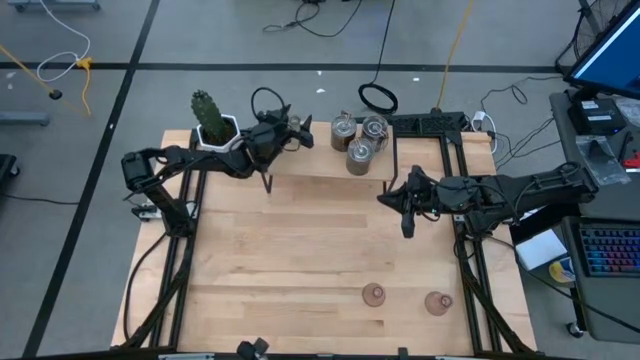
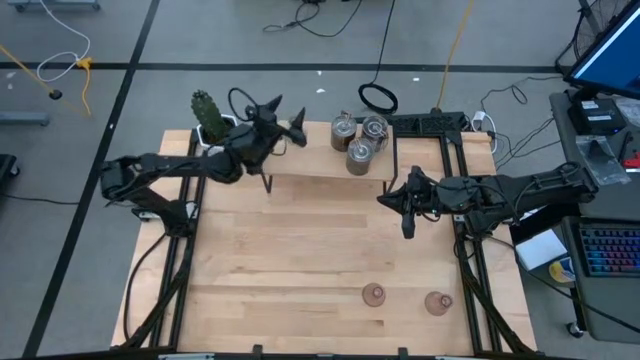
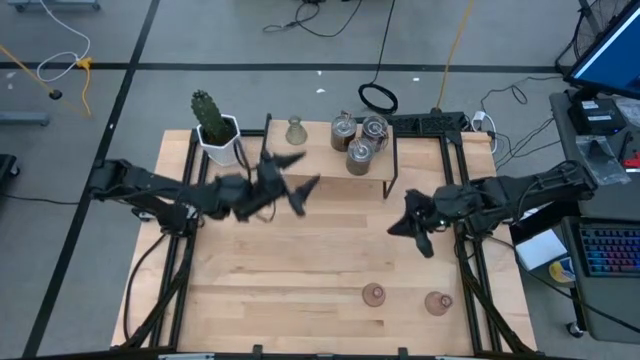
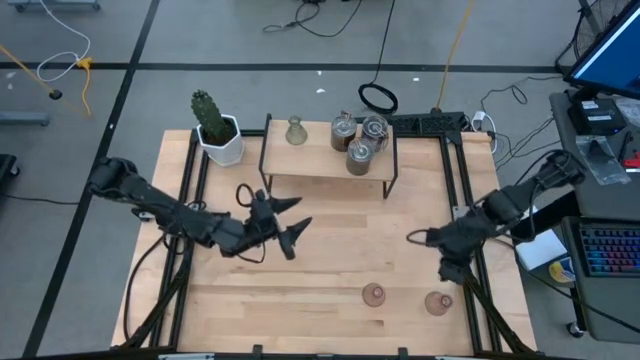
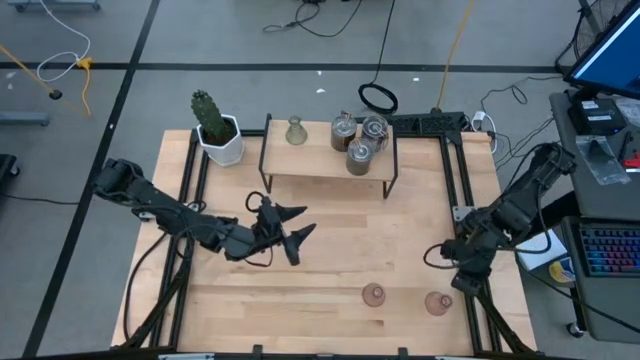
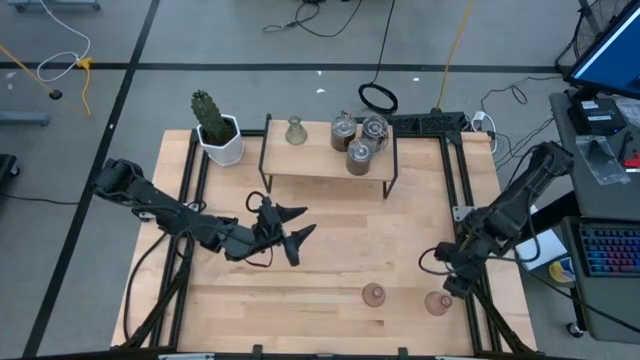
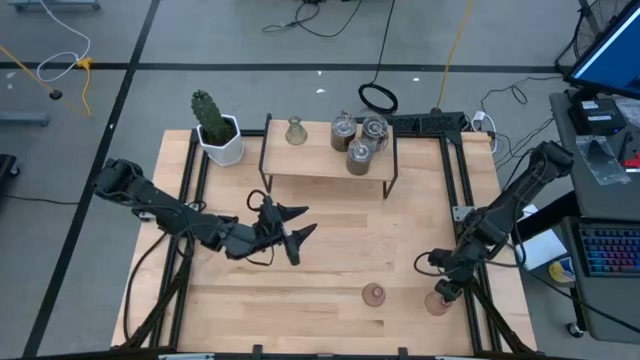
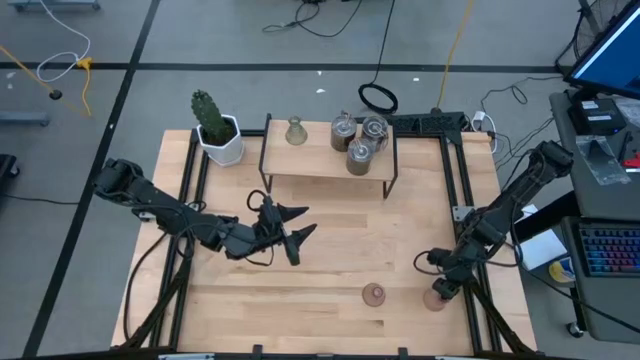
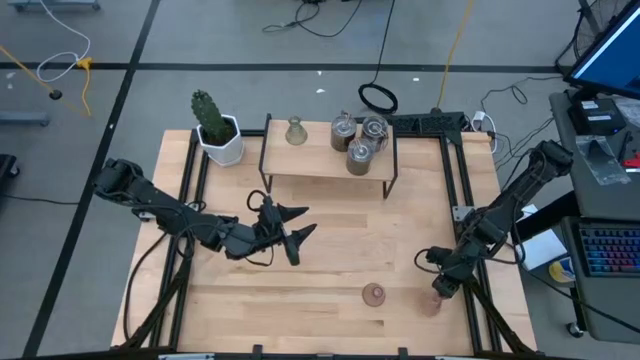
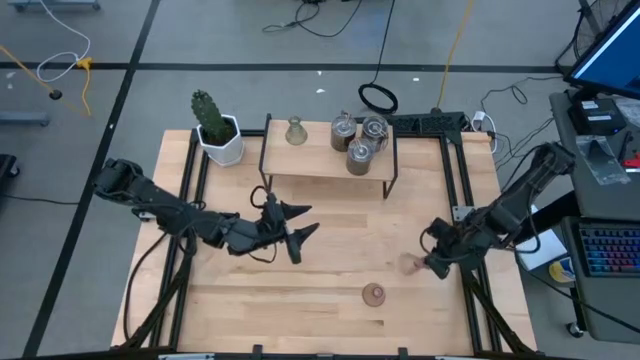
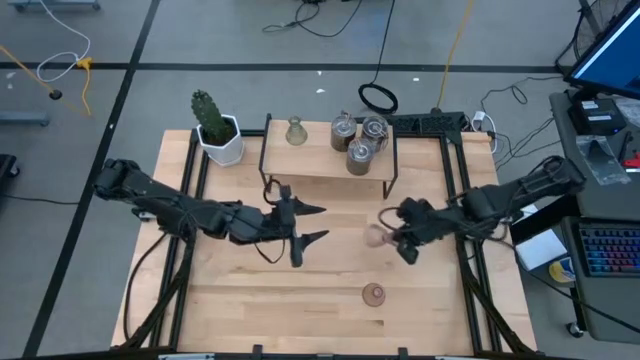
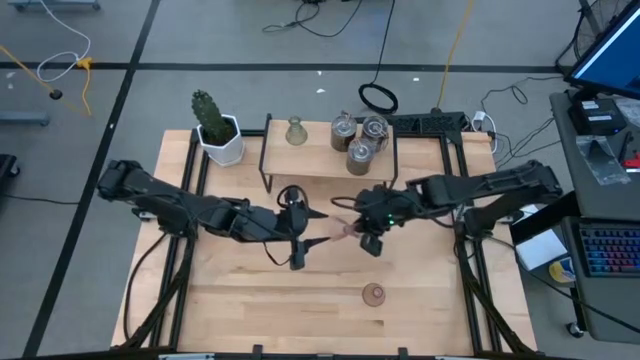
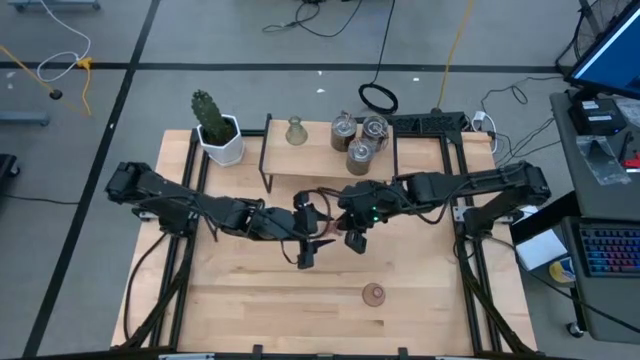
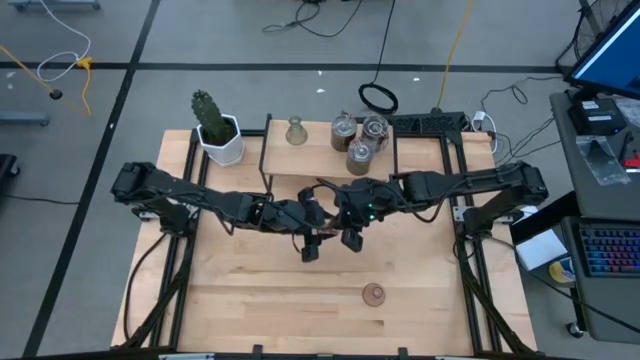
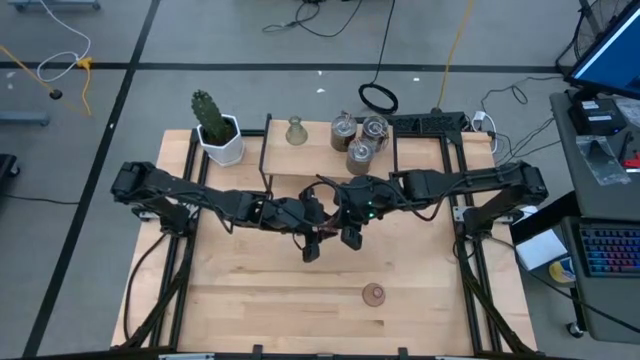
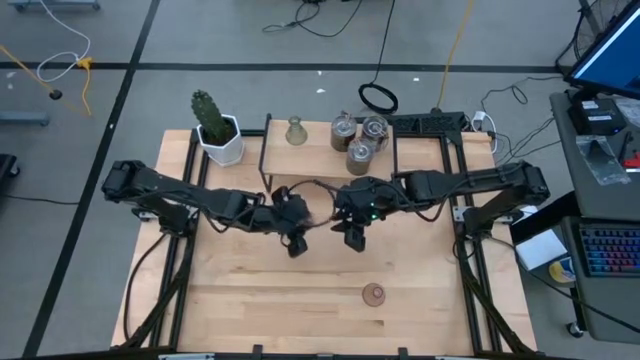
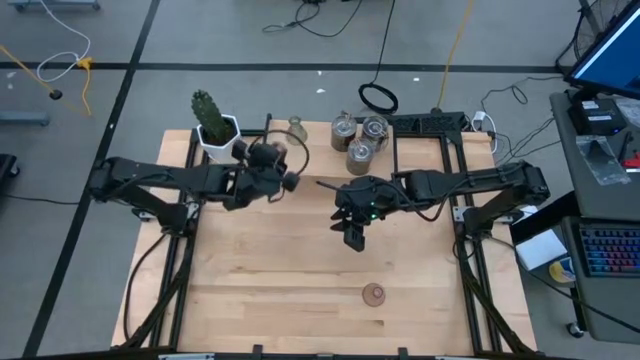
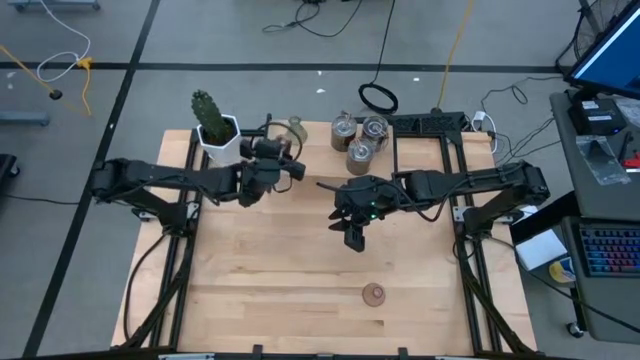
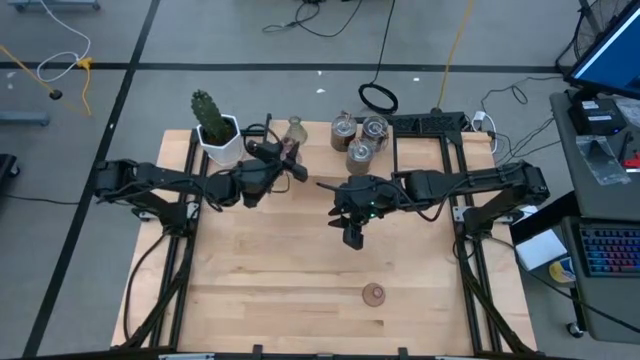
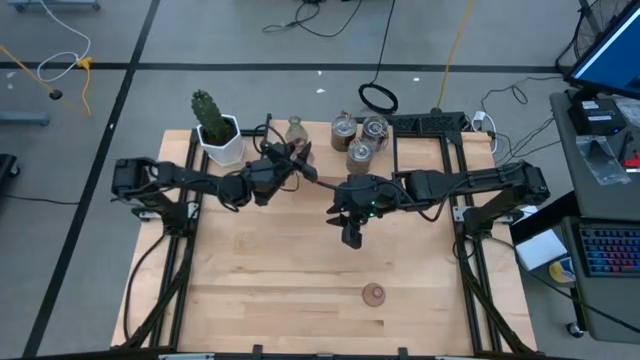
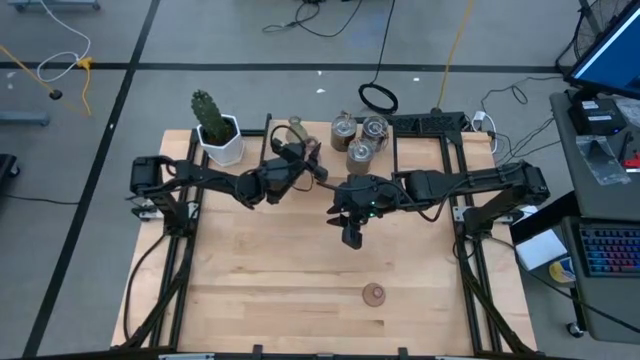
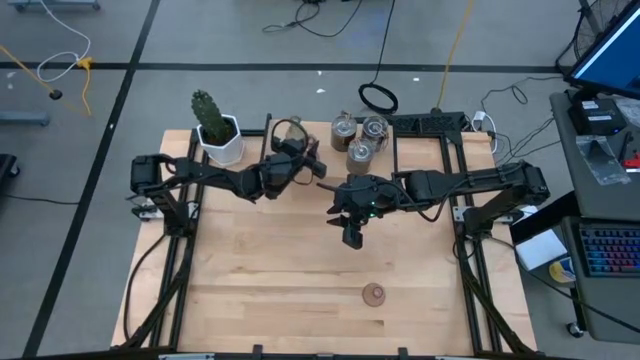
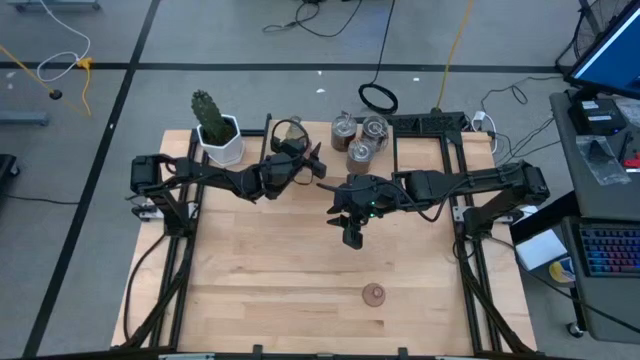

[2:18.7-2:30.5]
Task: Pick & Place candle stick holders
Put the right pink vase candle holder on the shelf

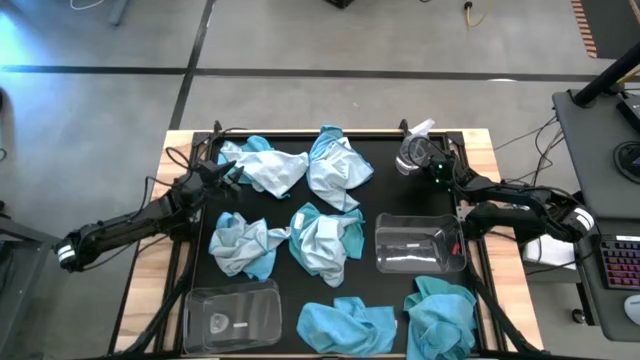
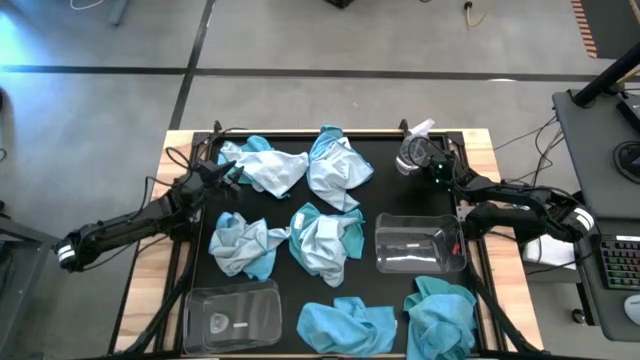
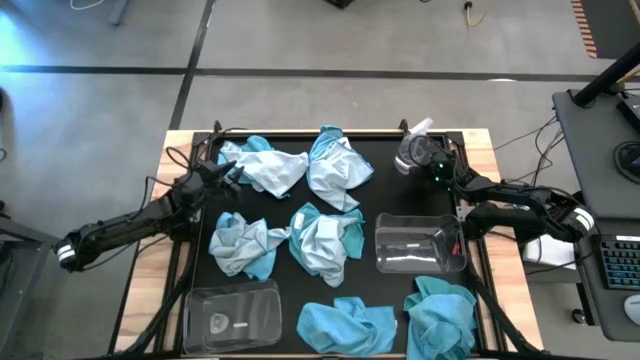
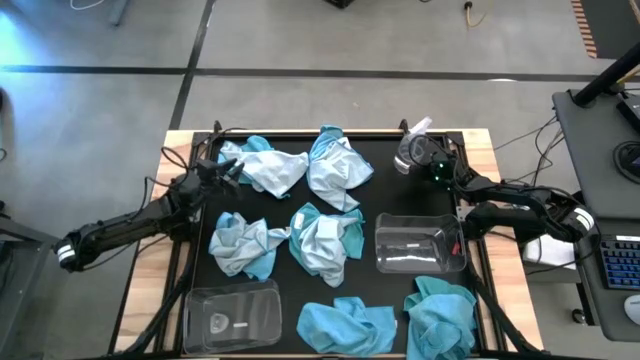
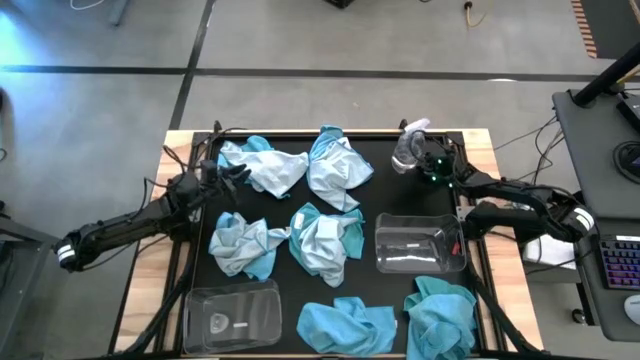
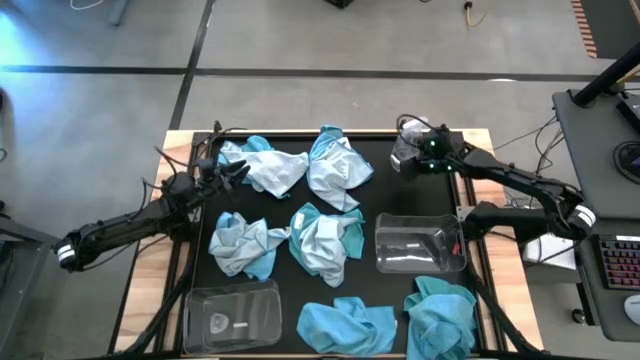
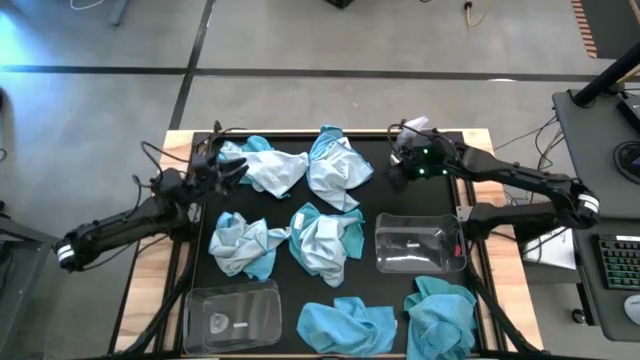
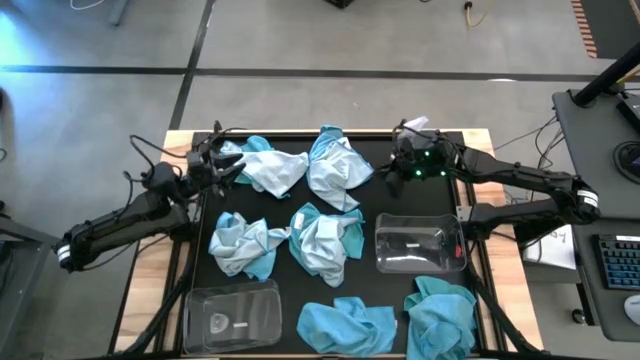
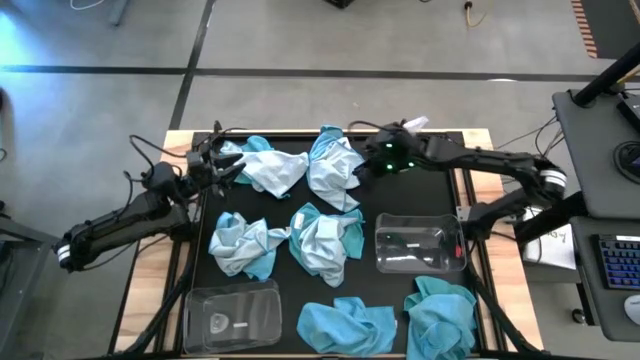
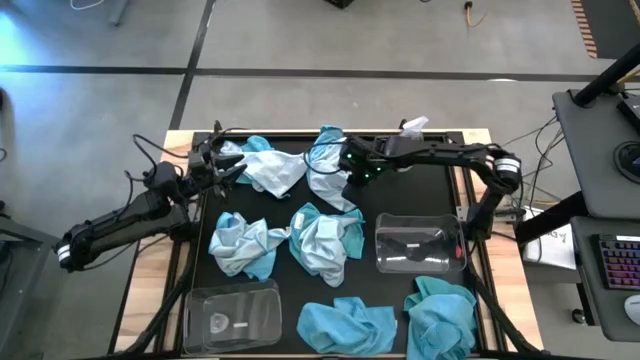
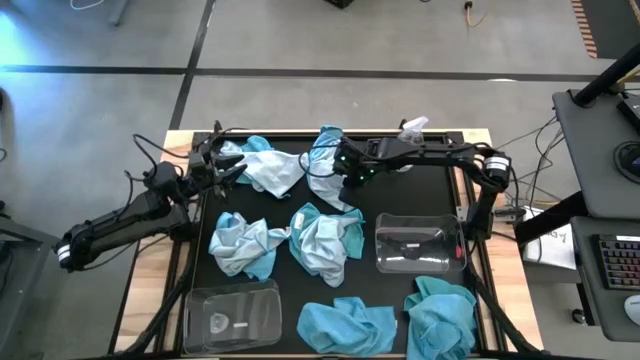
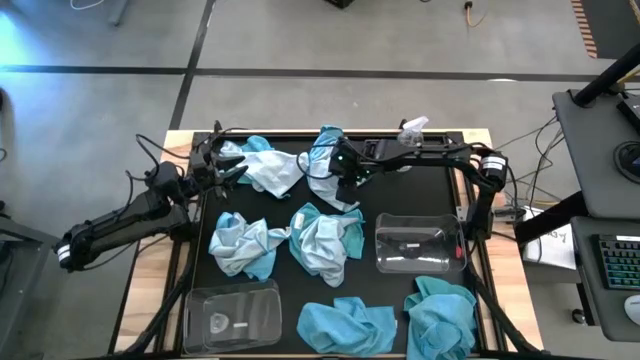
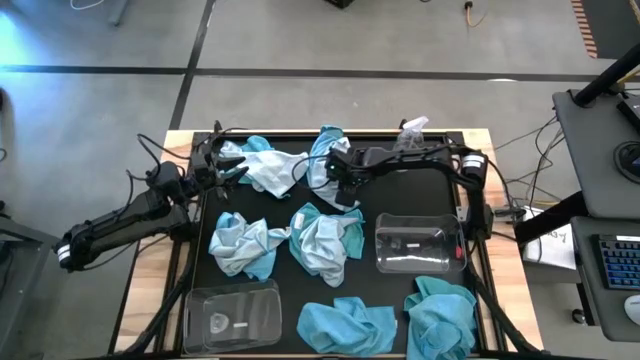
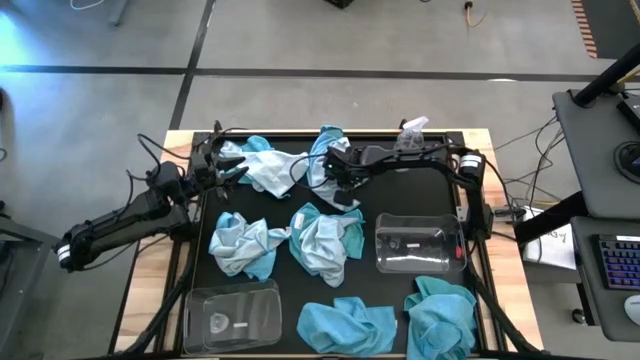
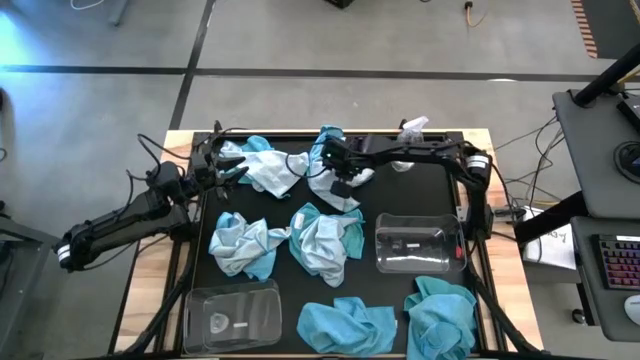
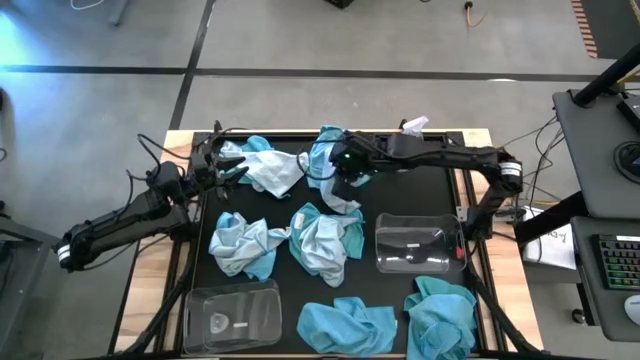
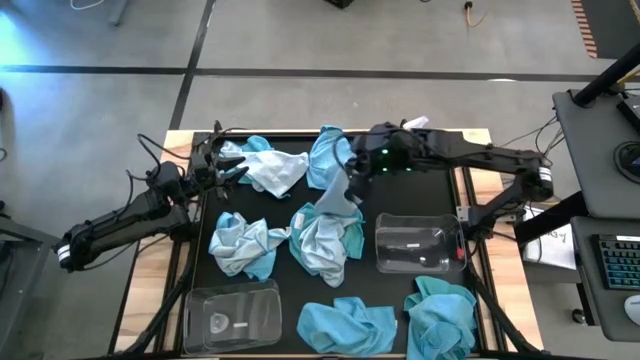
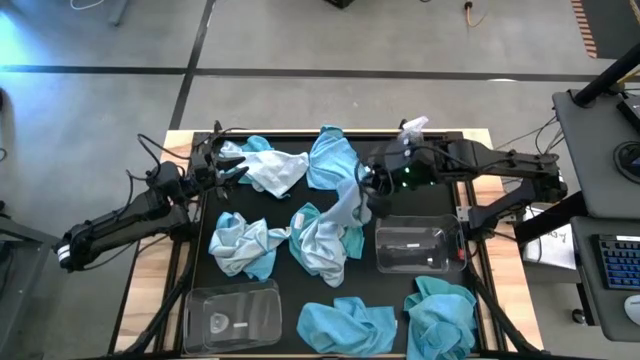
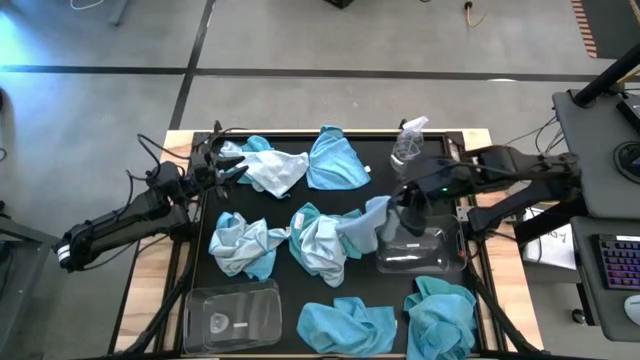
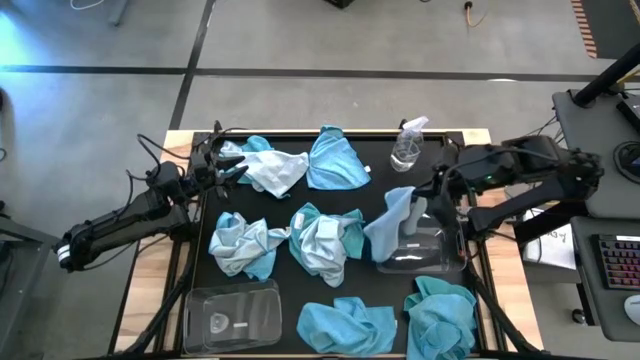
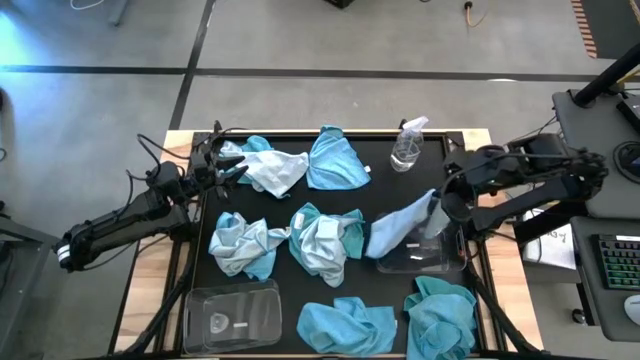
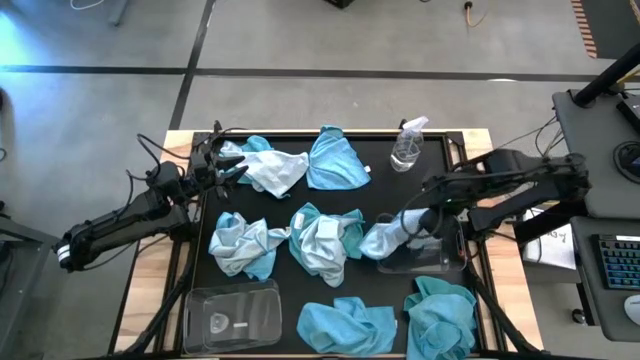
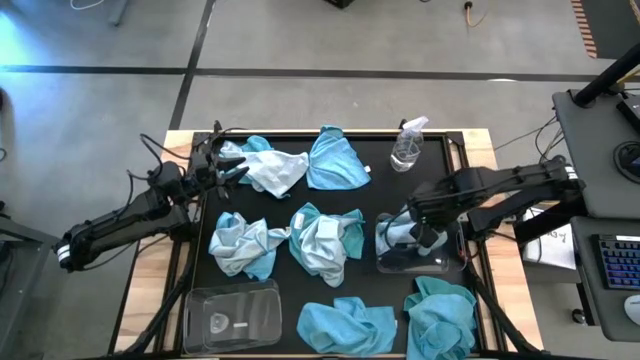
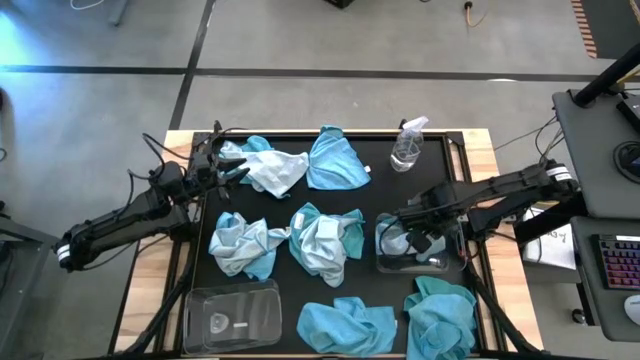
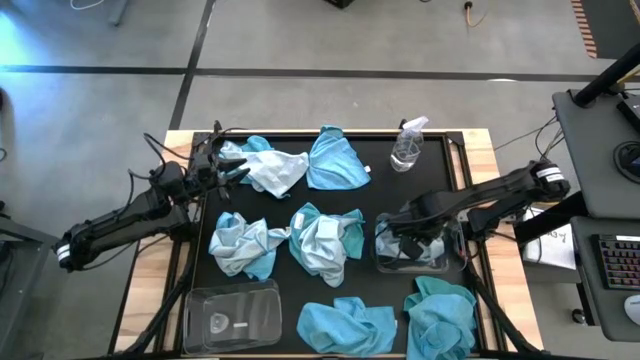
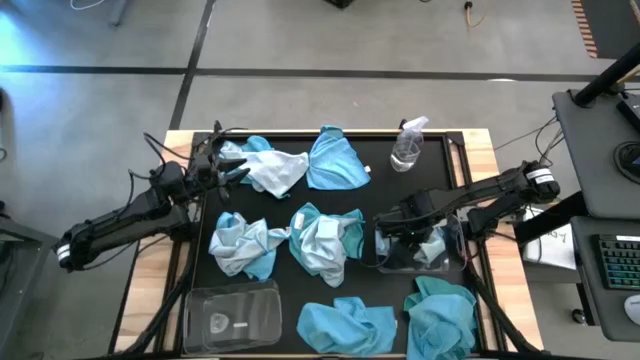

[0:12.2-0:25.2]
Task: Sort microfiber towel by color & place in baskets
Put the light blue microfiber towel into the right transparent bin
